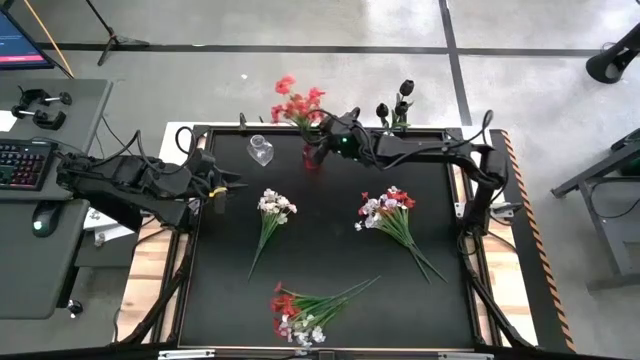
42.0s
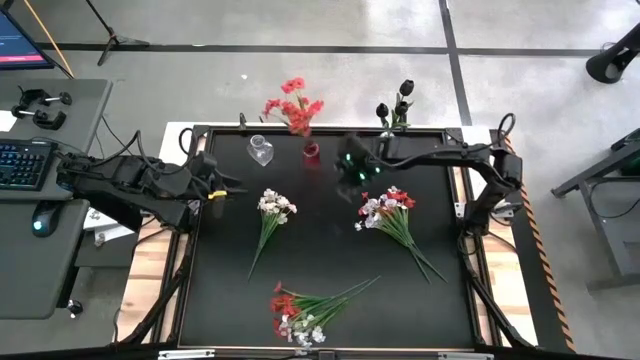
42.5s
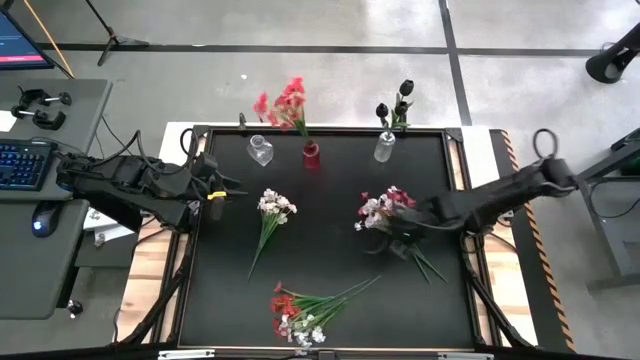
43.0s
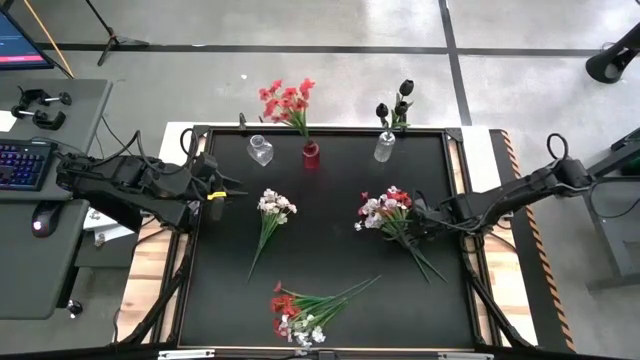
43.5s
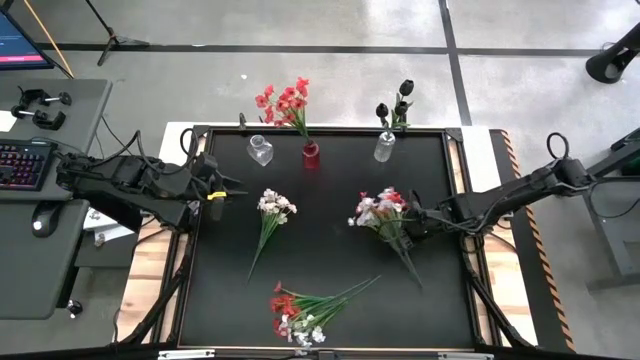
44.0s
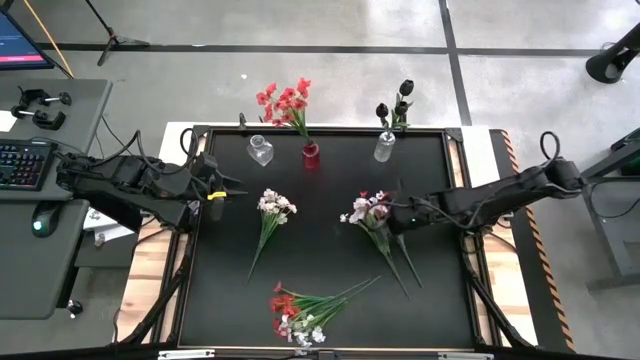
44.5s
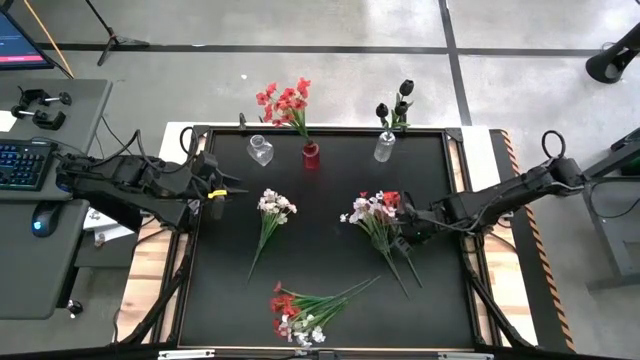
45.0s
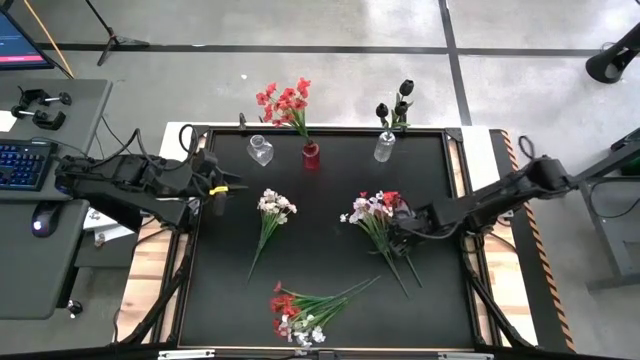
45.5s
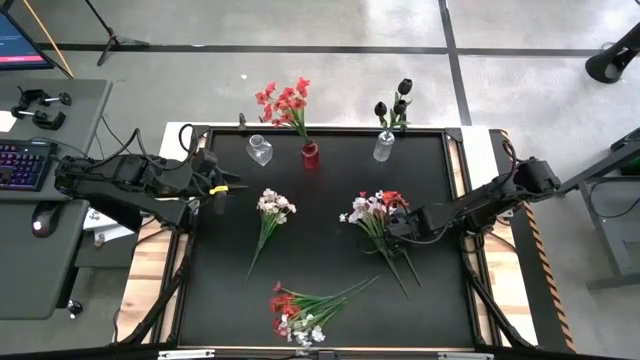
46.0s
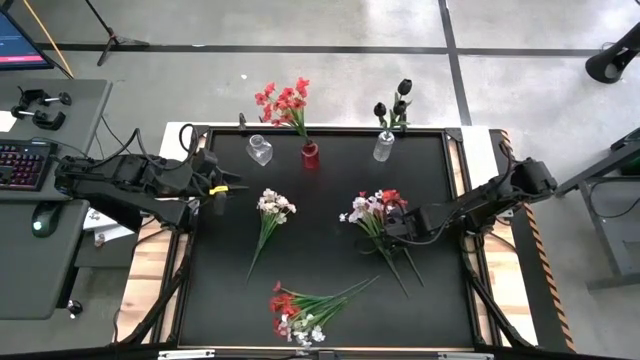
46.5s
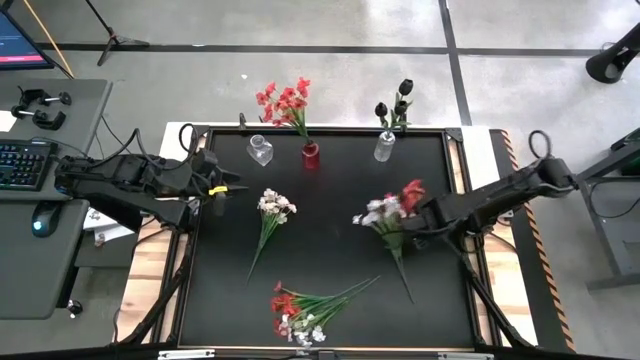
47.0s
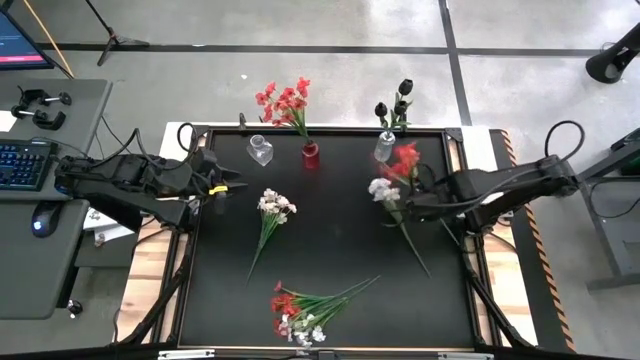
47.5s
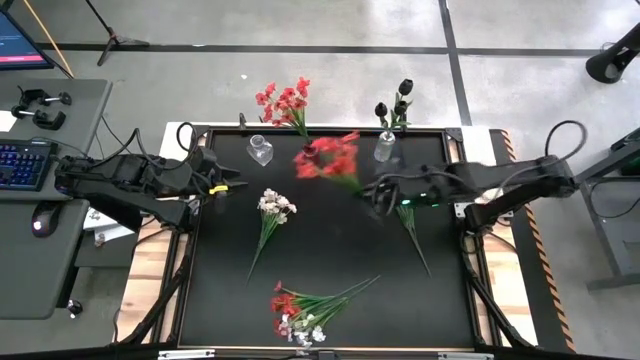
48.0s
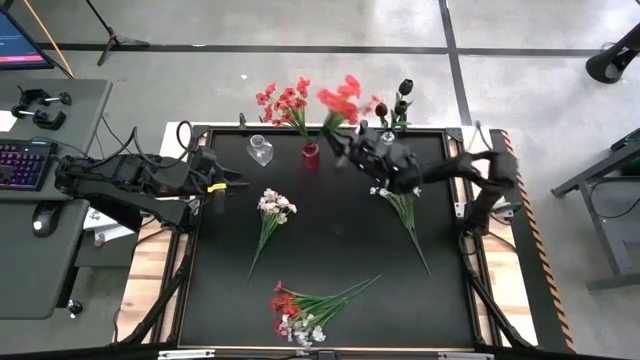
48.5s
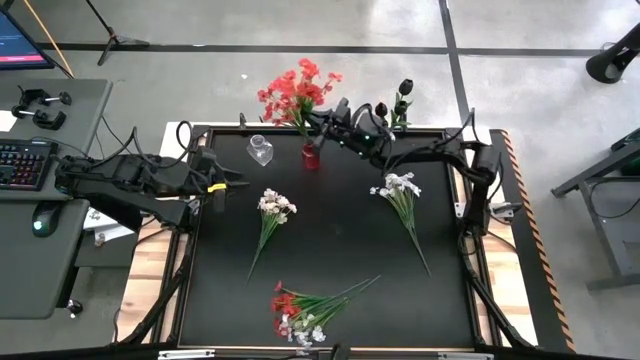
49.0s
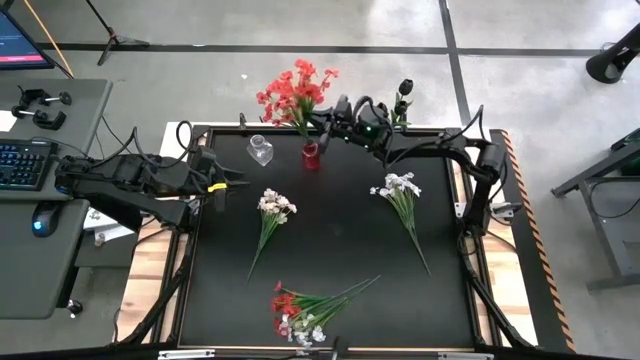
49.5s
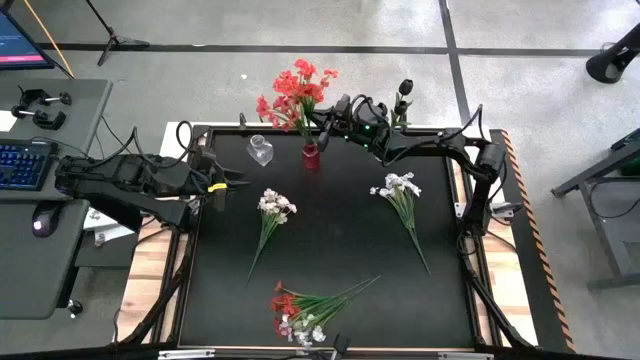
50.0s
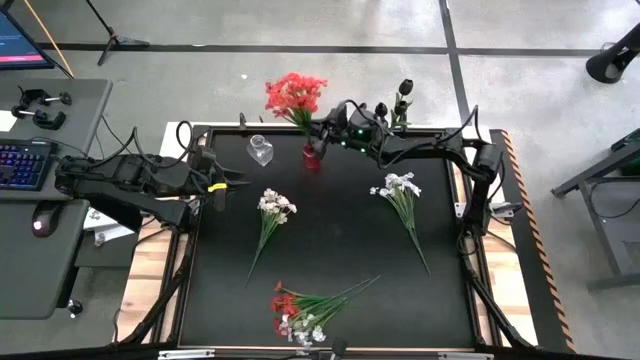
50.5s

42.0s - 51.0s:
Task: Sort flowers into vase by color
Put the top red flowers into the red flower vase

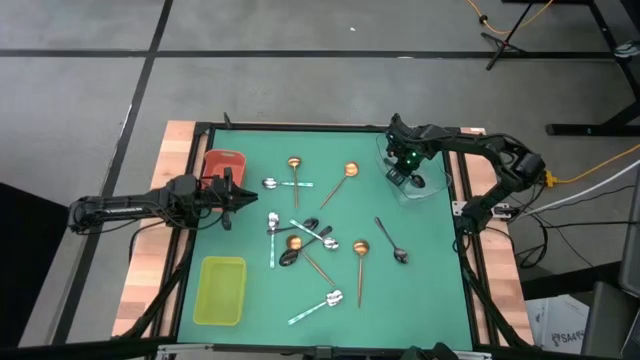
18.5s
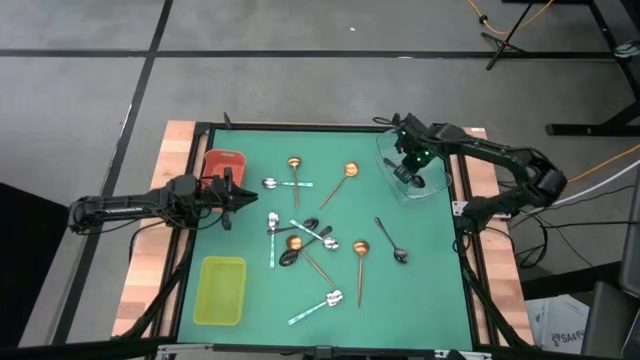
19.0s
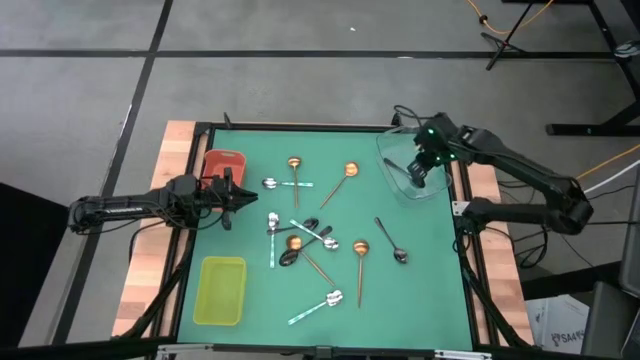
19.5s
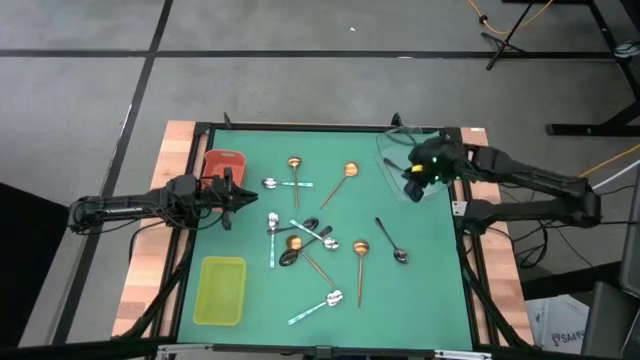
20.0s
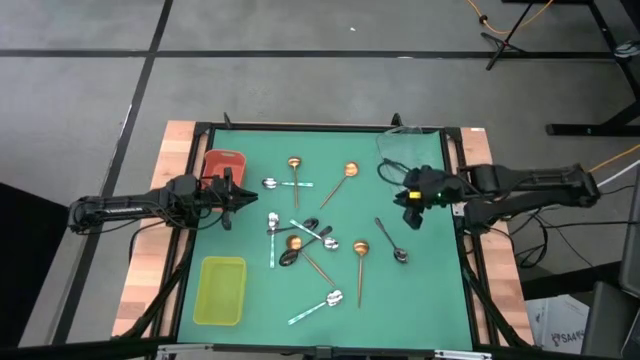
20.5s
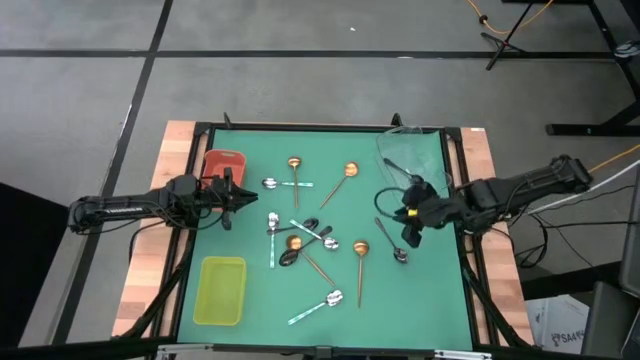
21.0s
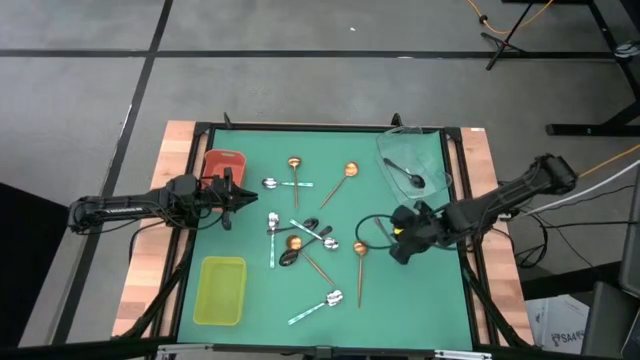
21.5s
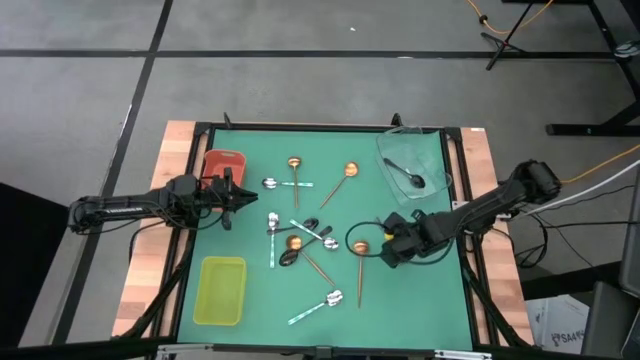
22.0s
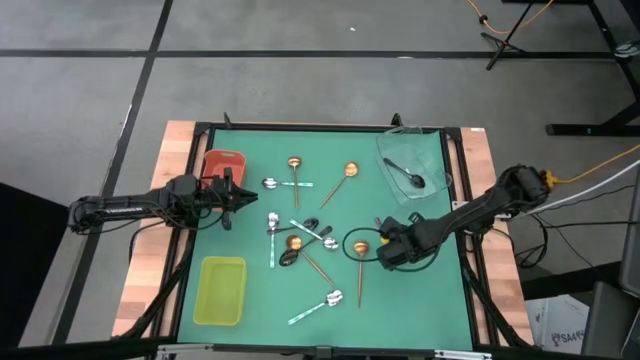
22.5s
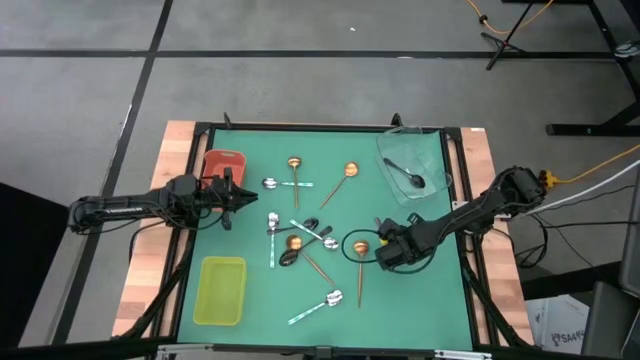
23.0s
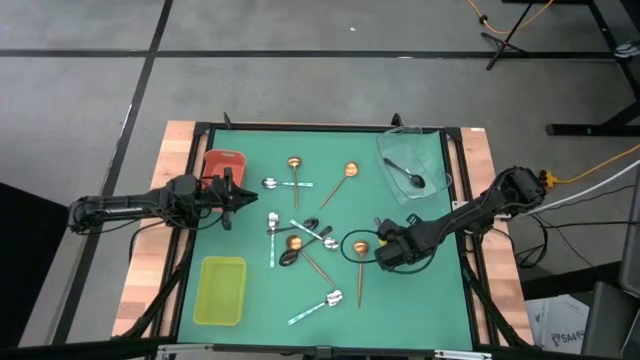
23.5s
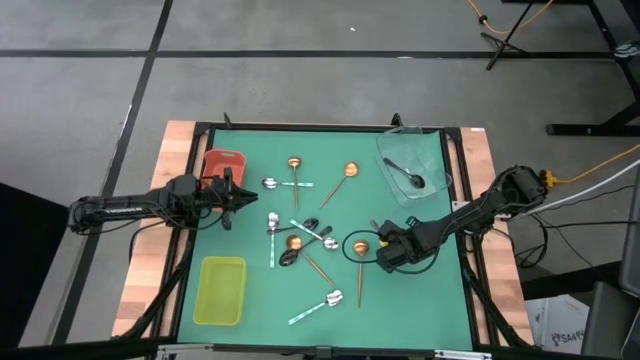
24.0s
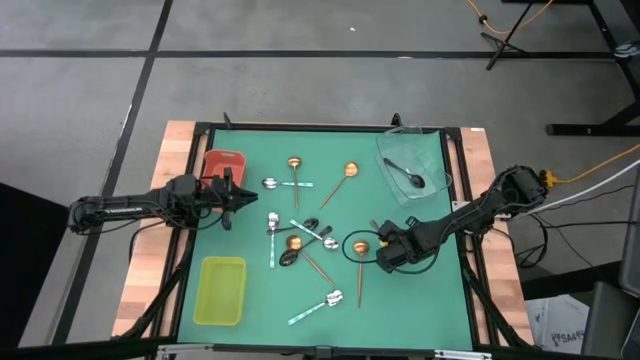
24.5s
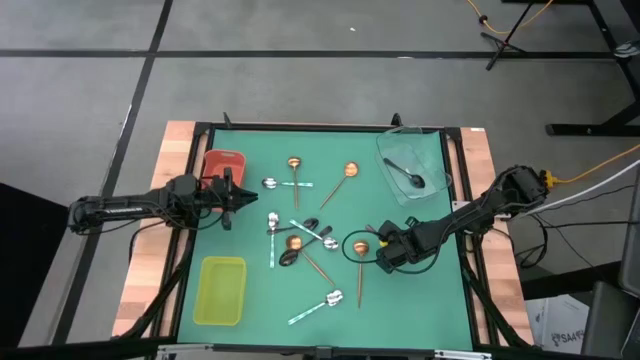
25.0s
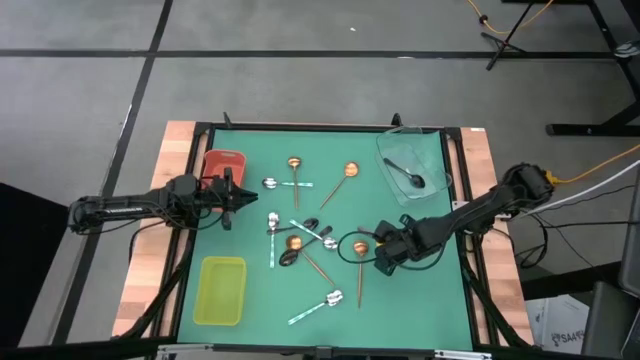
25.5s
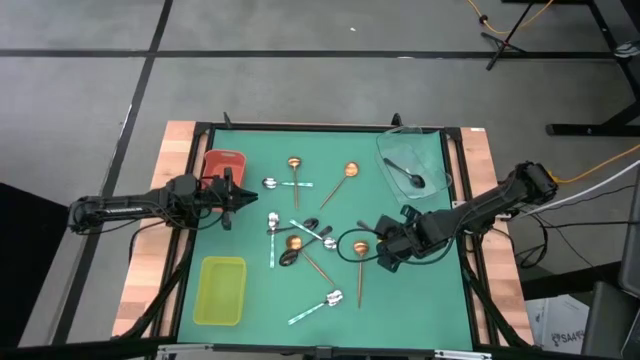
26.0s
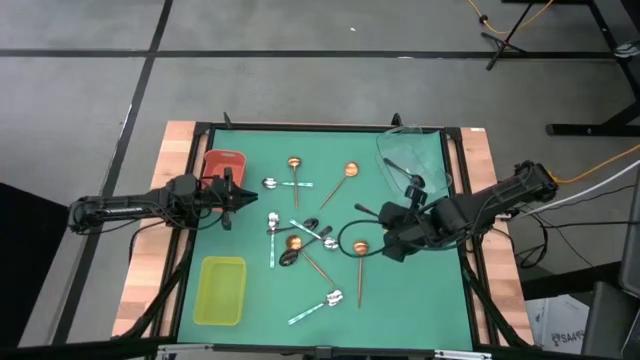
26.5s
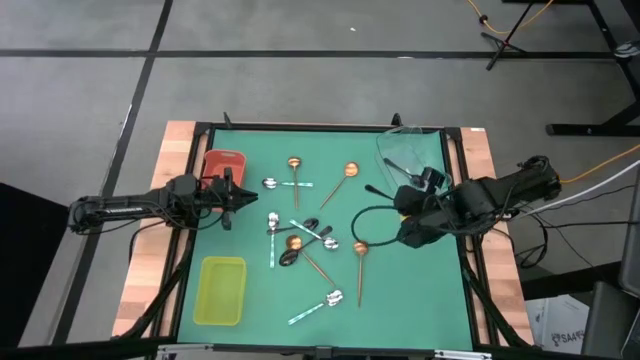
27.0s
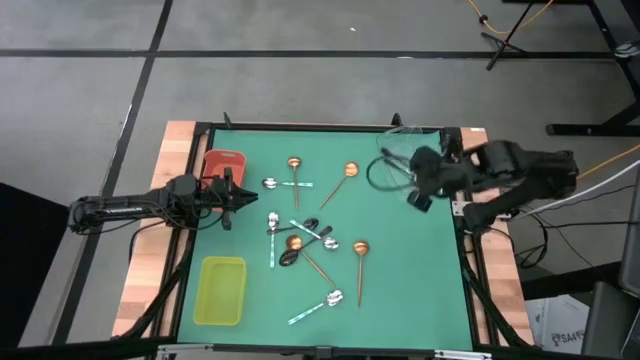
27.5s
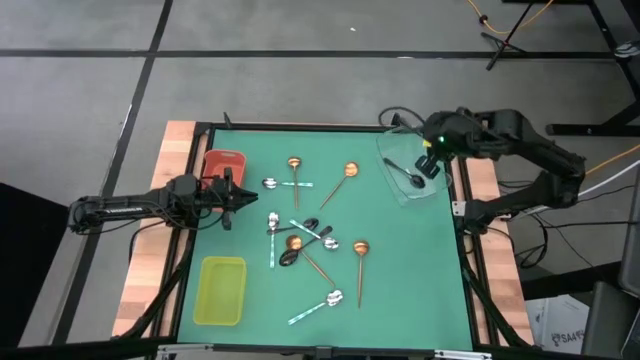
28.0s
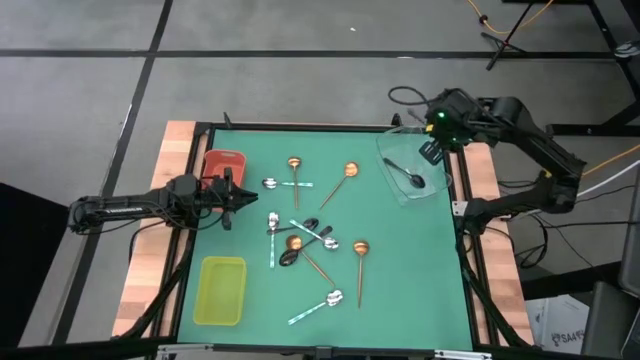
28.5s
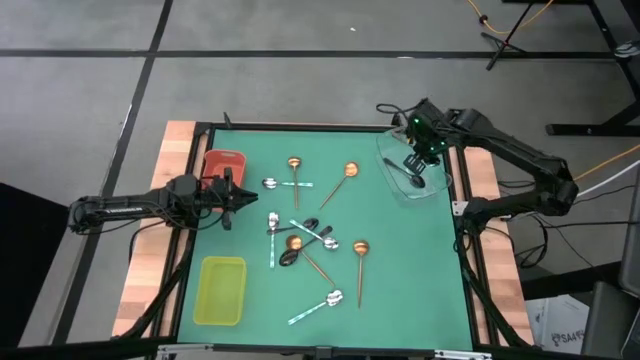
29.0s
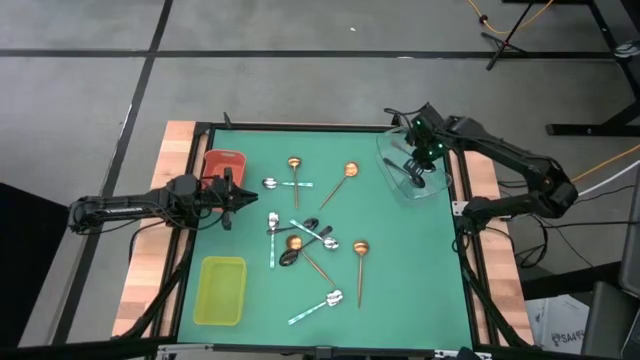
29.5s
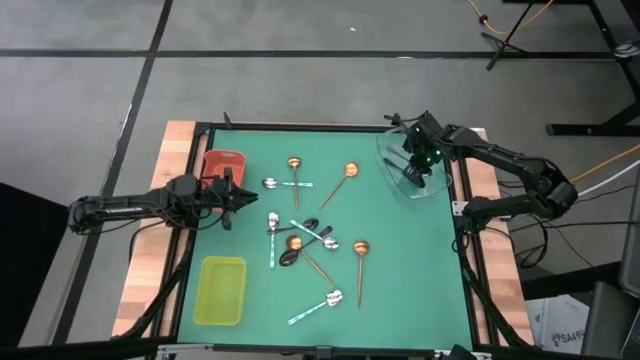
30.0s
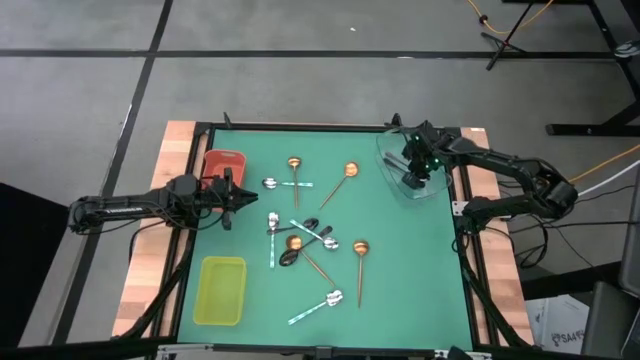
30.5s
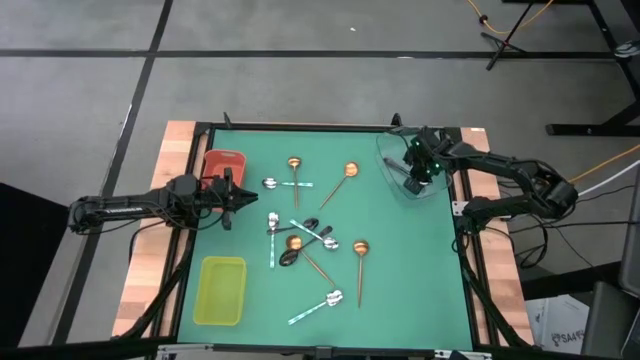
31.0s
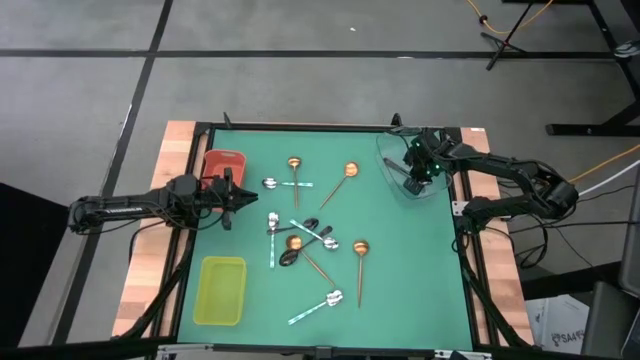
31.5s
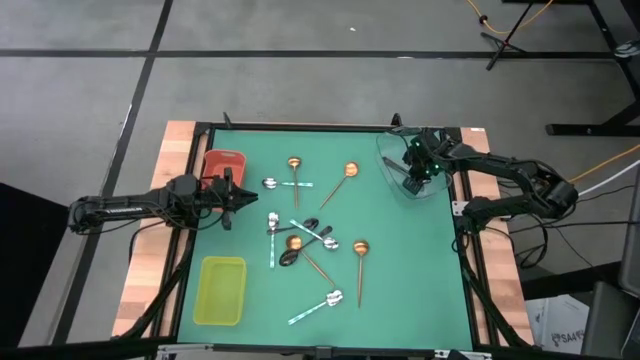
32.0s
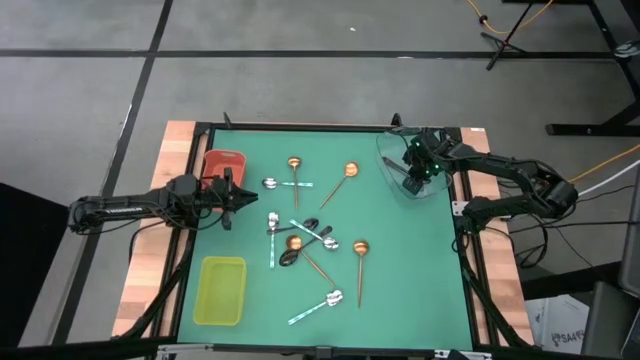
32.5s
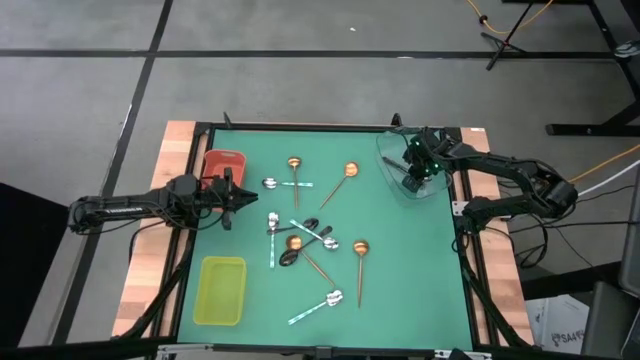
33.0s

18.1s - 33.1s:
Task: Sort silverware by color (type)
Put the black spoon into the transparent bin
